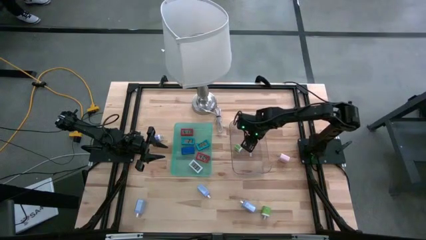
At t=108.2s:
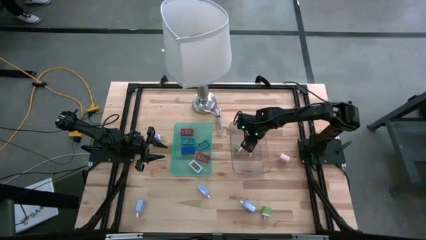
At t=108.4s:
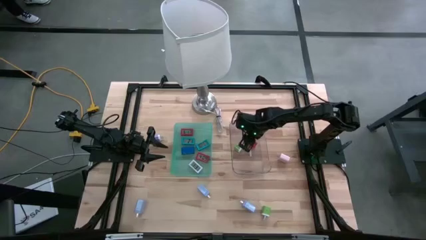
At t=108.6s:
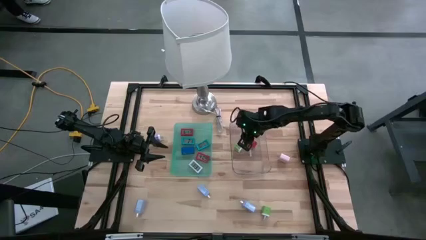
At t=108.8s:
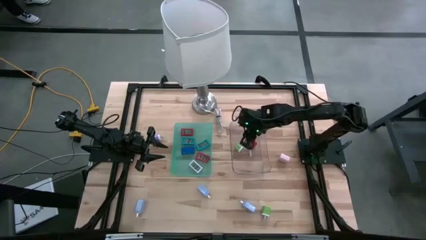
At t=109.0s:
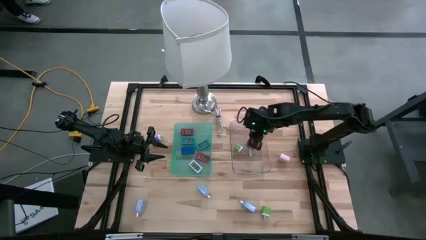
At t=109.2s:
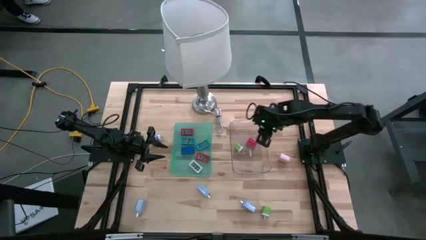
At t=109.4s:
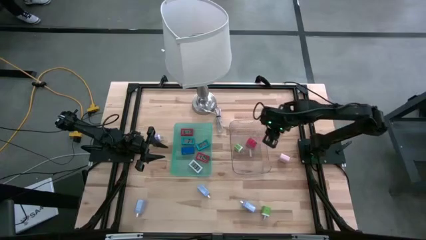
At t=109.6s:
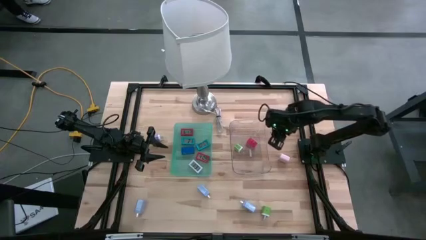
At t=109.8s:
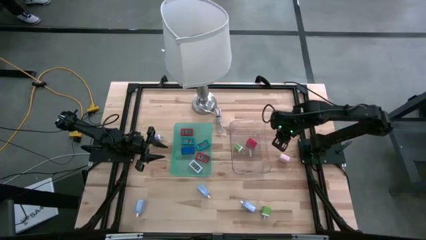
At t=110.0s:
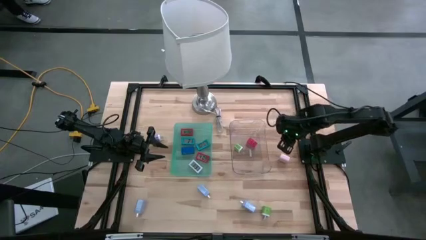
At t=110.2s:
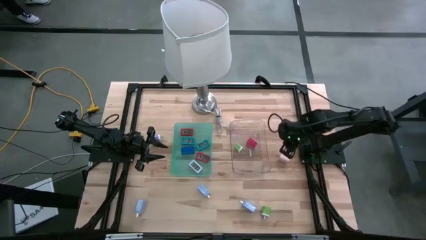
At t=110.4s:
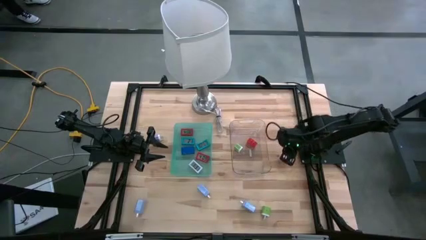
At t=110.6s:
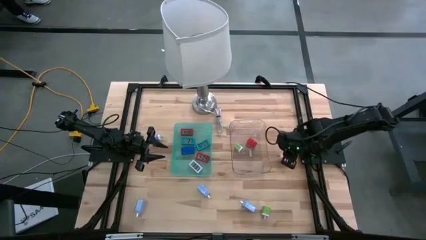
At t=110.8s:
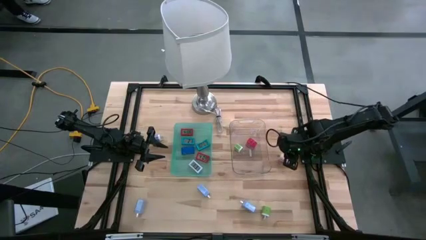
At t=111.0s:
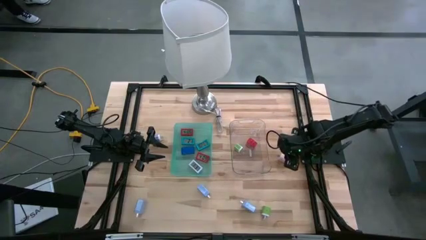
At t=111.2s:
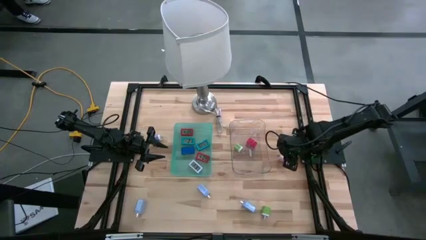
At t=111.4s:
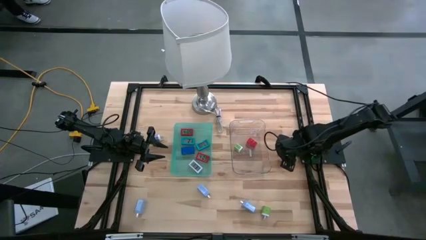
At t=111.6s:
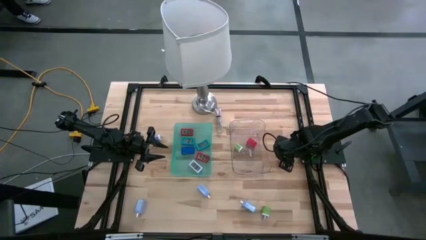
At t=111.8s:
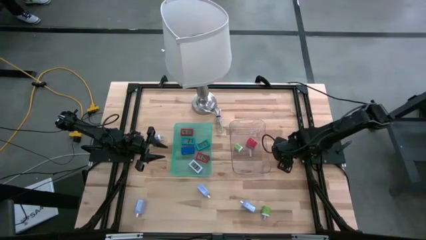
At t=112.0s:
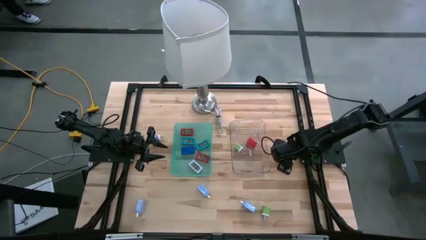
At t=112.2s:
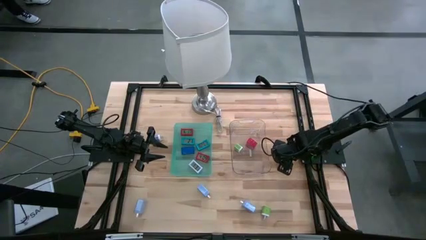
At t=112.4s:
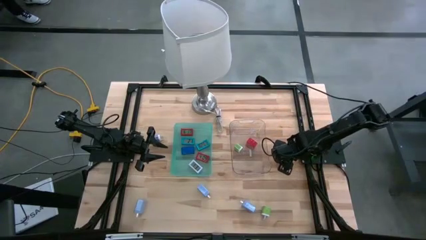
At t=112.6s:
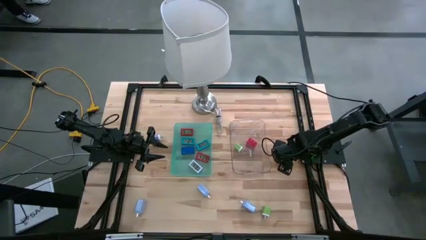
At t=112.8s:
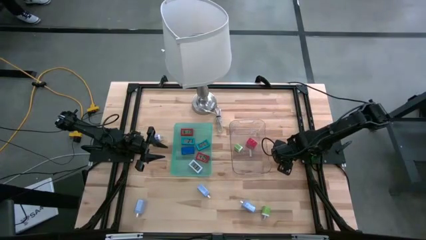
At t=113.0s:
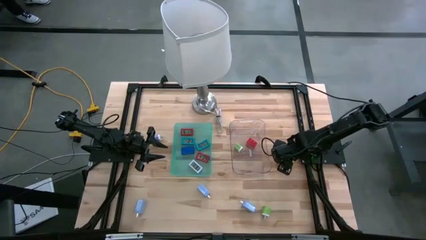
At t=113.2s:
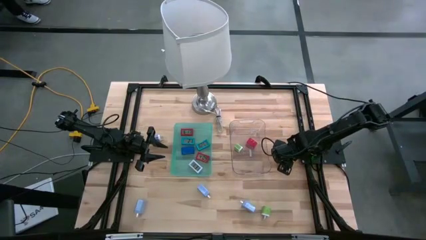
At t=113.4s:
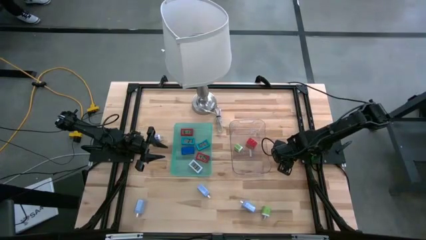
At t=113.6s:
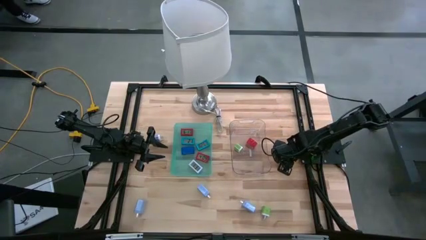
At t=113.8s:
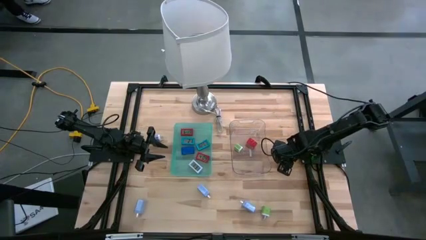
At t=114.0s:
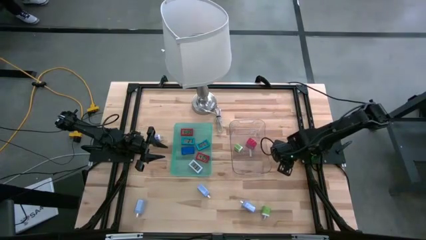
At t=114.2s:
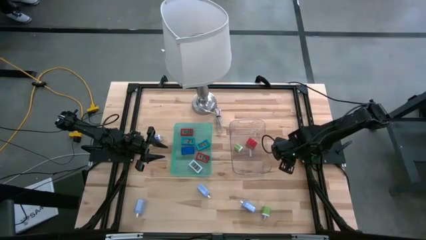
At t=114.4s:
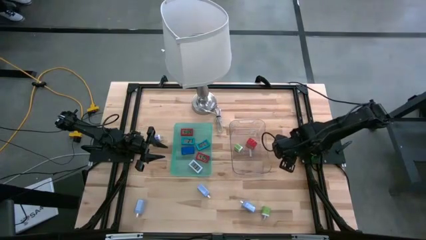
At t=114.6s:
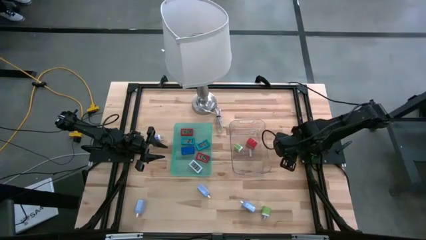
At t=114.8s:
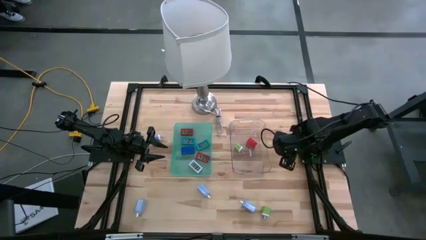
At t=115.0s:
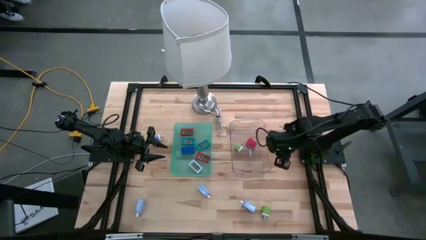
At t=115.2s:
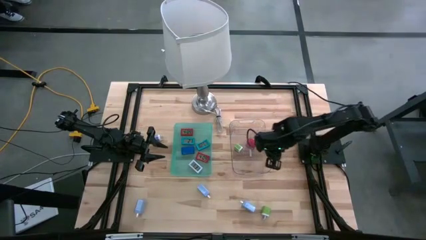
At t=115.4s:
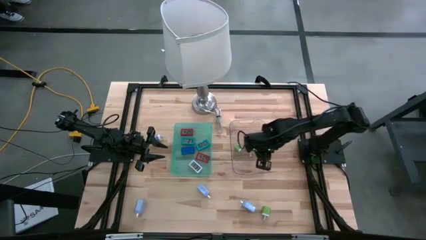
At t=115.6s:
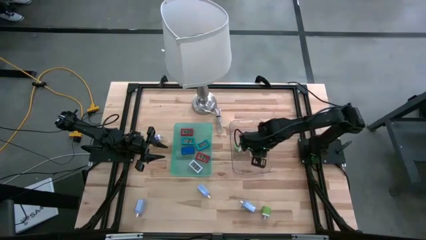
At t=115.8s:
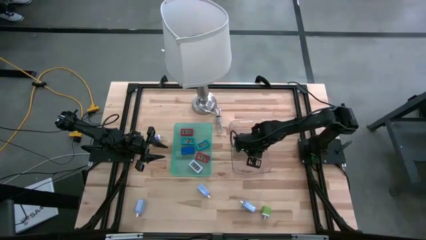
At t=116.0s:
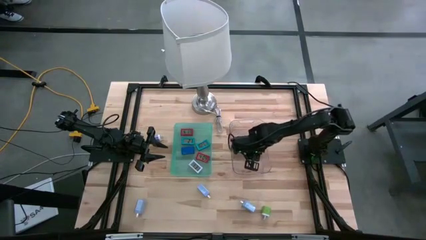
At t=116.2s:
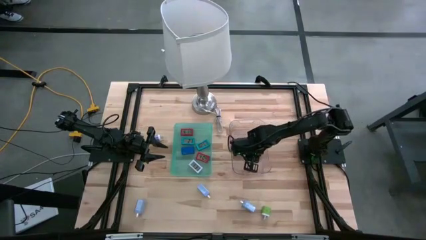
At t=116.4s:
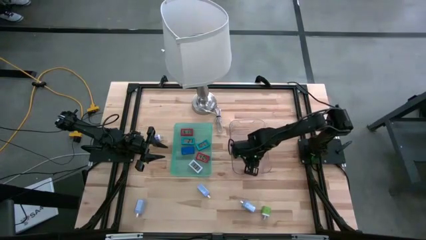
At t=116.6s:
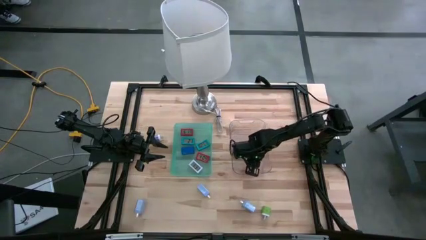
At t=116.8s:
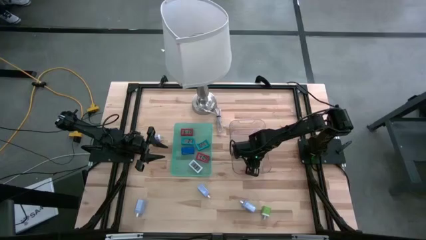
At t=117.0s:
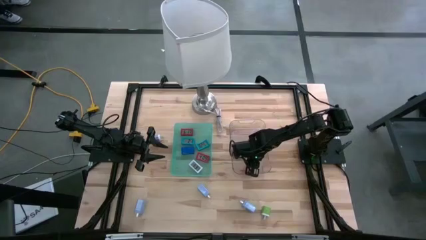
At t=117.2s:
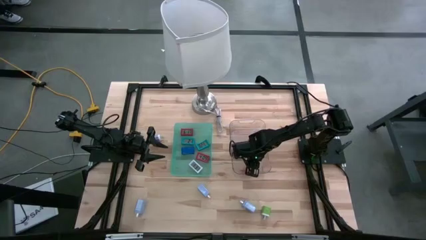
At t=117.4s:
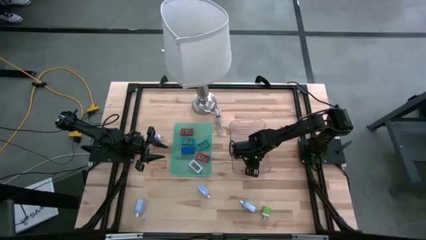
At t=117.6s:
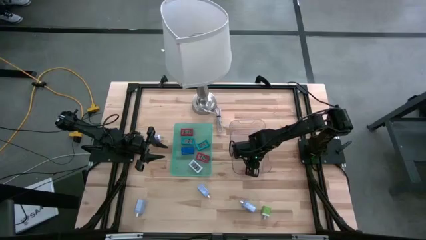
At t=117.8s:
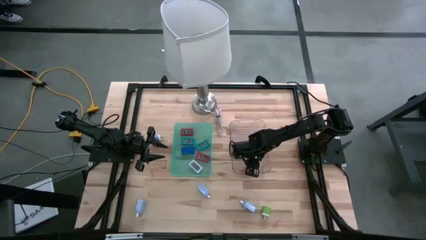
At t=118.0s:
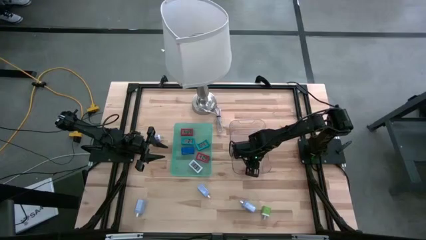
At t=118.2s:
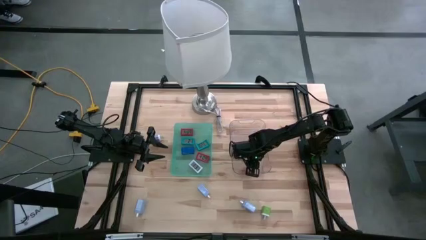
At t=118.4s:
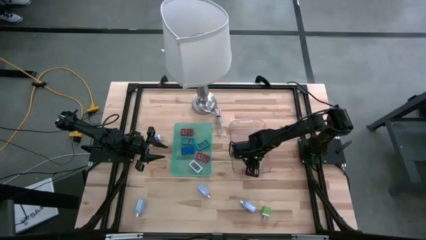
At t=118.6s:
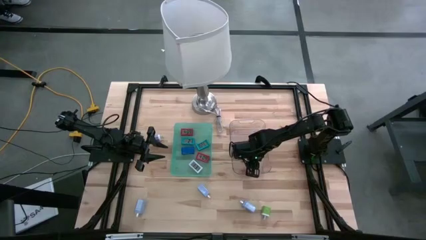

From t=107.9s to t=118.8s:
Task: Pick & Place Office items
Put the white charger adapter into the transparent bin

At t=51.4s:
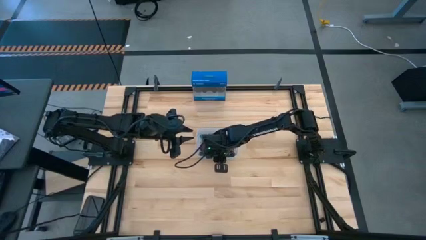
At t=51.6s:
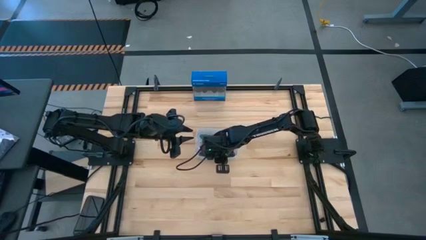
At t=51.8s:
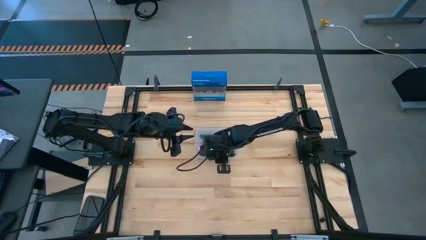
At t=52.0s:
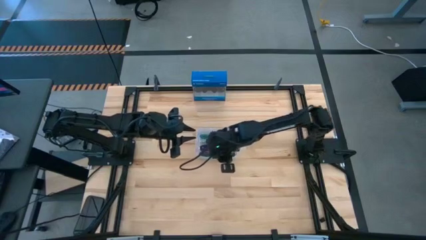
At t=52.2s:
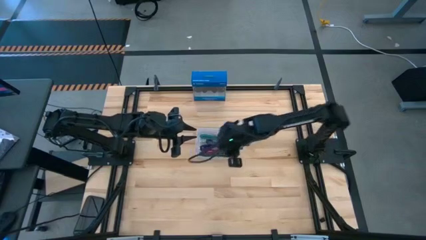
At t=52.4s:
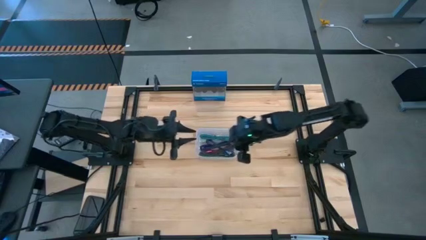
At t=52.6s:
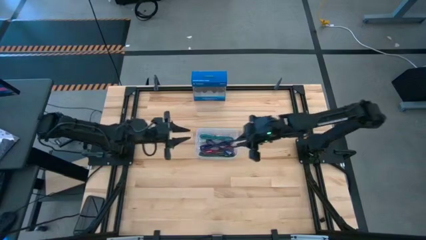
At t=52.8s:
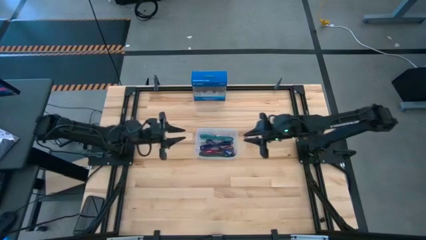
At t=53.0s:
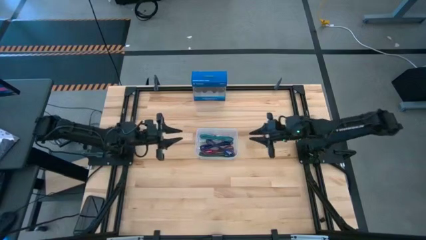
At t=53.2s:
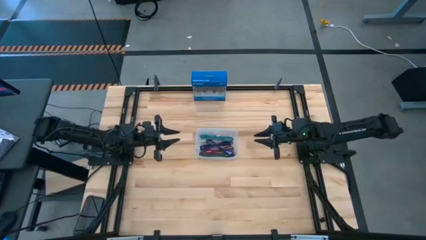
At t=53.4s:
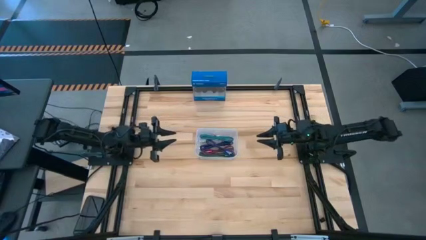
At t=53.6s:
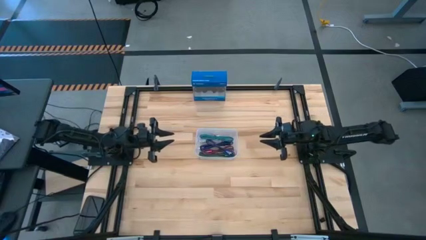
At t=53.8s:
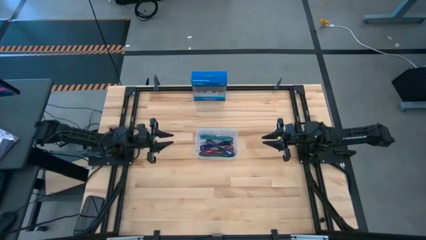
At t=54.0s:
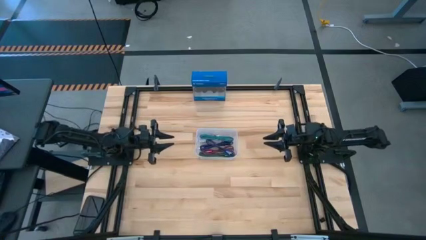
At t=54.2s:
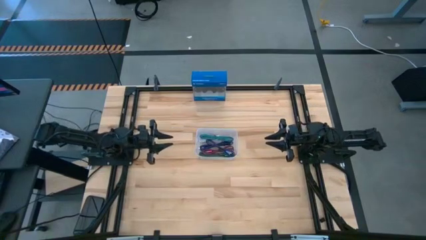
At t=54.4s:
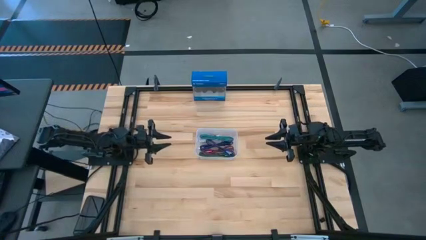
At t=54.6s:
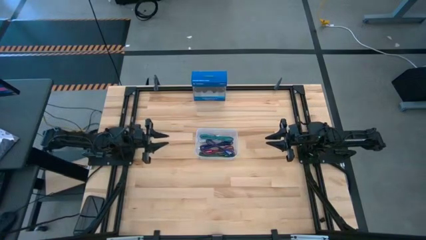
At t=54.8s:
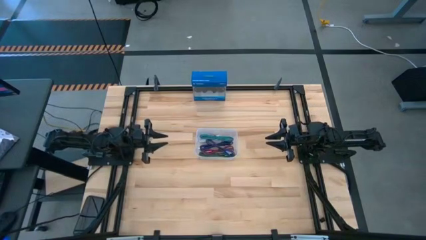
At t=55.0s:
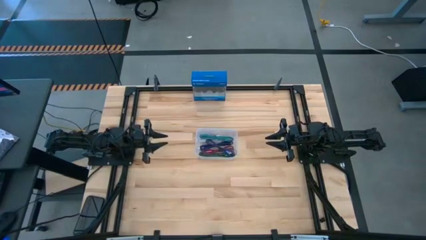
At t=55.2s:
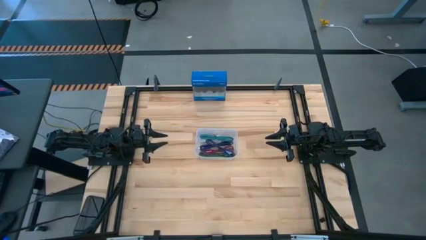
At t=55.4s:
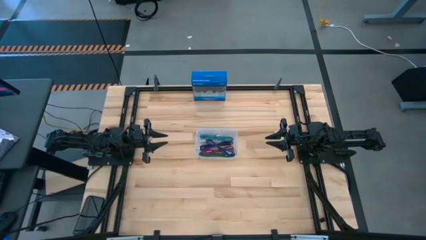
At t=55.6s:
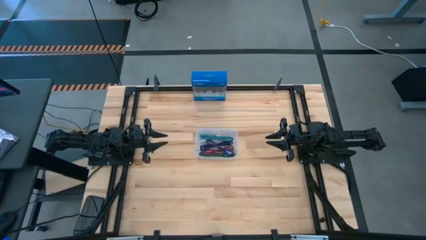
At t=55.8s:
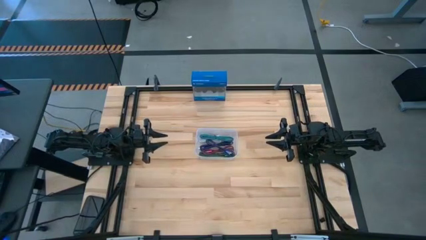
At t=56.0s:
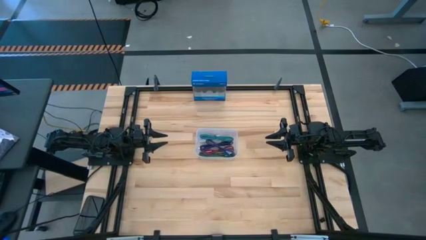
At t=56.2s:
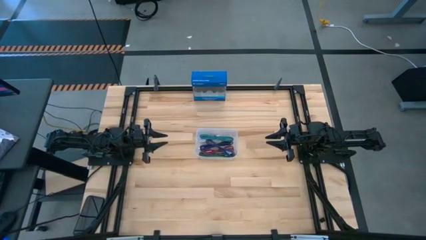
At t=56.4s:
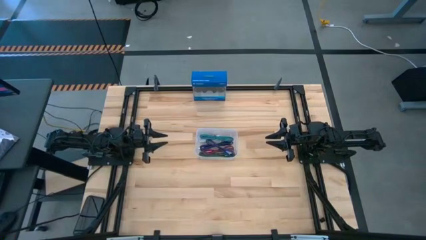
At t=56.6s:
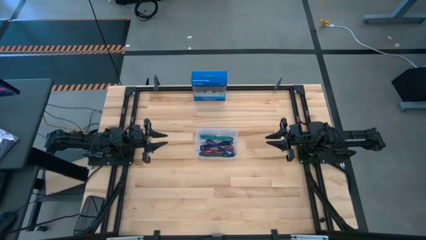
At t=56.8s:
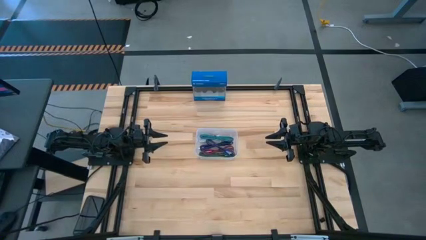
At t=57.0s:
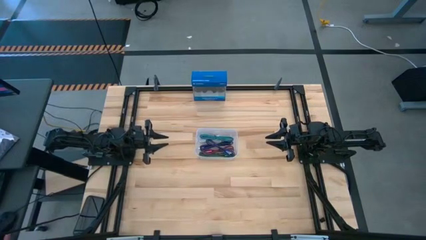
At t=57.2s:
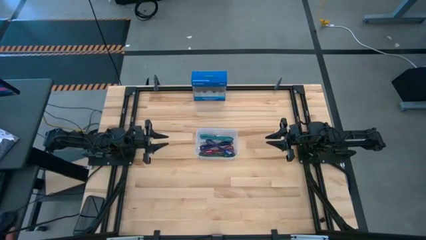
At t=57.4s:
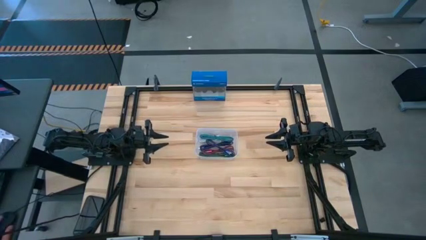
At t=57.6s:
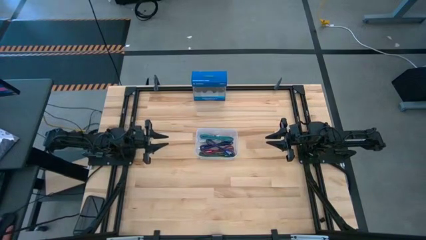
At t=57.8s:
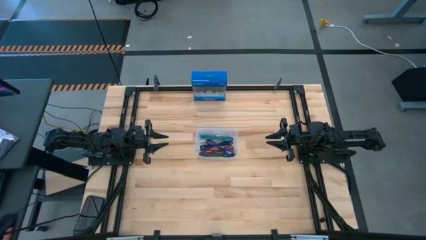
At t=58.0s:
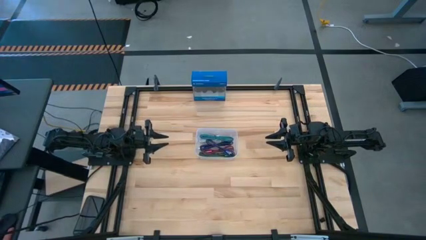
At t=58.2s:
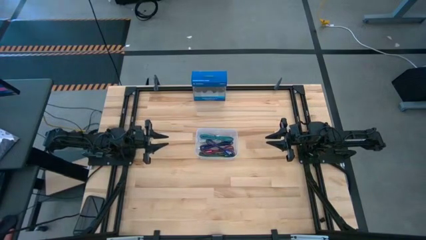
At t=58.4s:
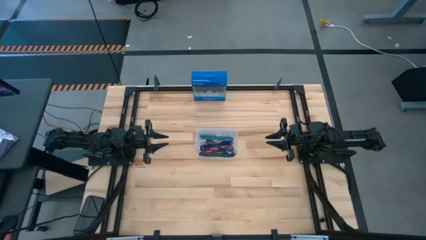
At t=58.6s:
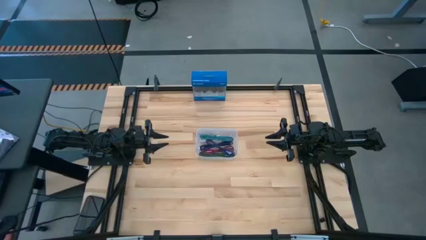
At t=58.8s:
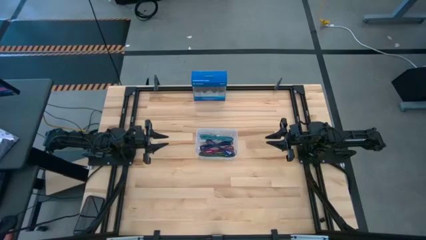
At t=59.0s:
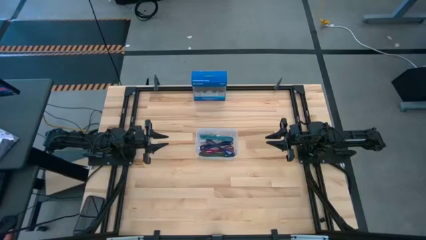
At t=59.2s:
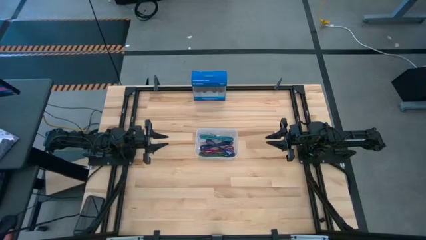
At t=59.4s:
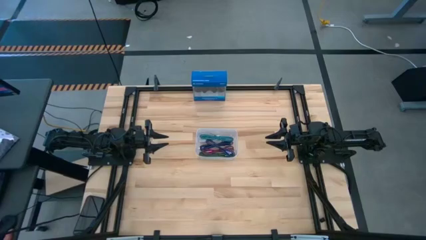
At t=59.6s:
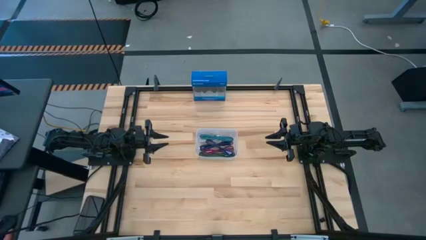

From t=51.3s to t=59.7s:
Task: Pick and place USB-C Cables
Return to Home Position
